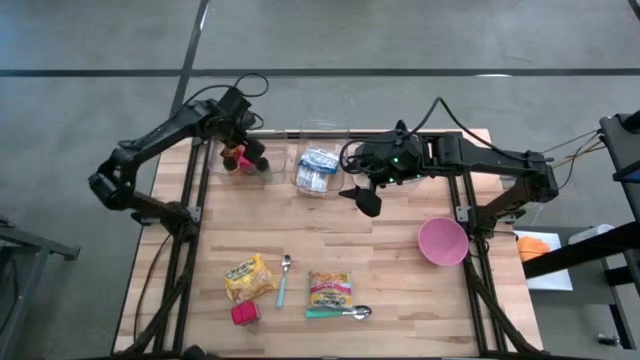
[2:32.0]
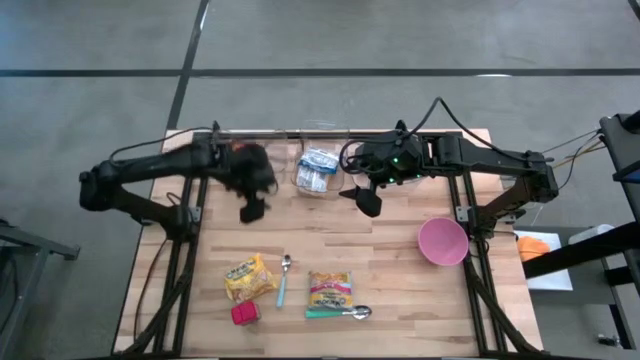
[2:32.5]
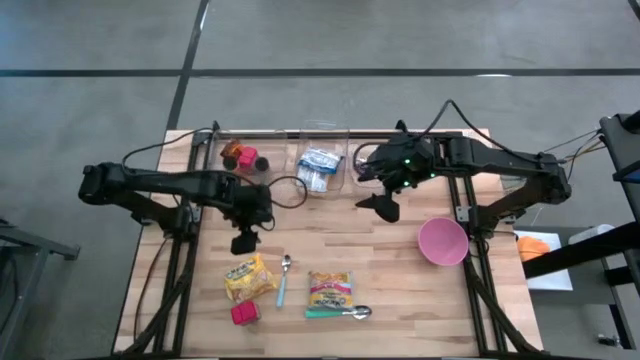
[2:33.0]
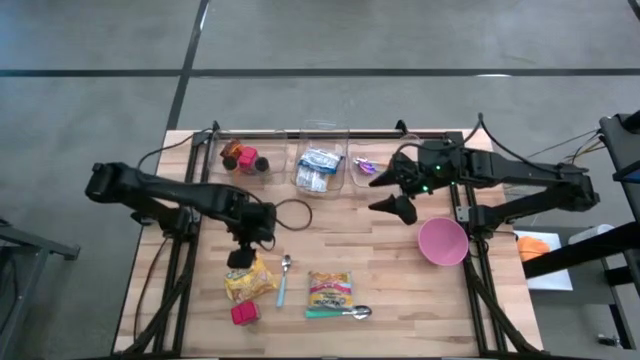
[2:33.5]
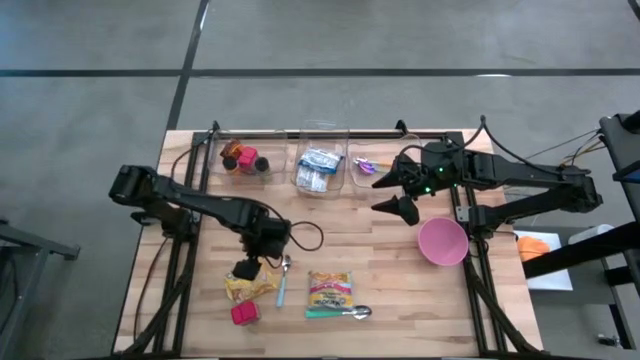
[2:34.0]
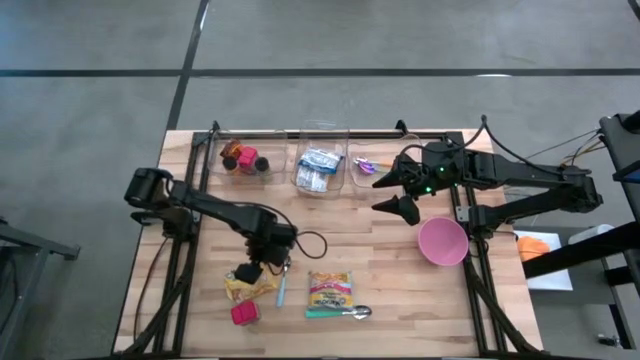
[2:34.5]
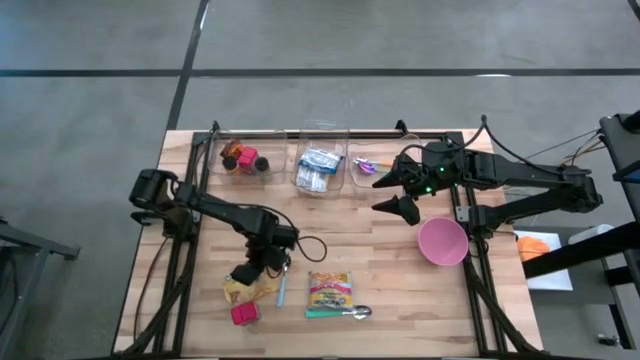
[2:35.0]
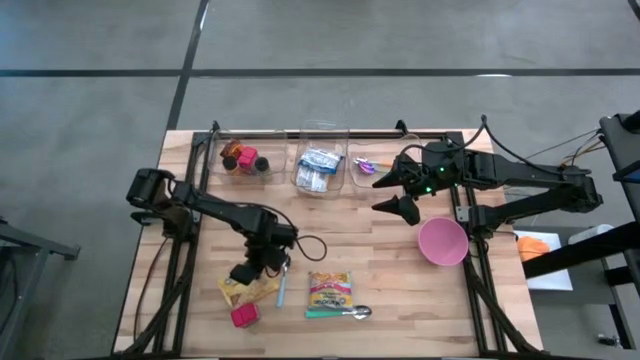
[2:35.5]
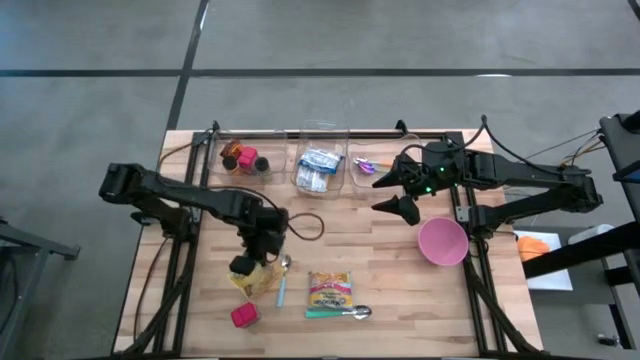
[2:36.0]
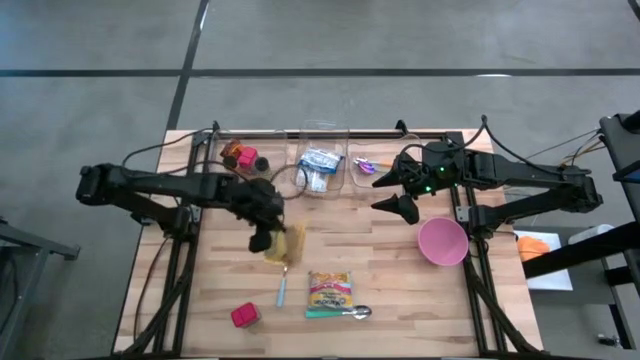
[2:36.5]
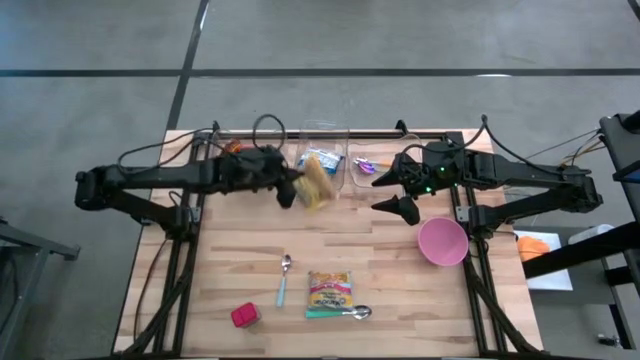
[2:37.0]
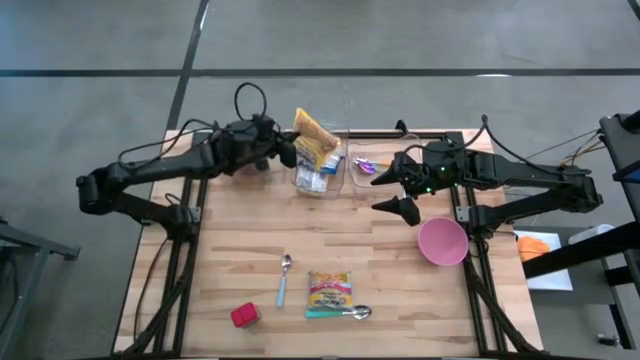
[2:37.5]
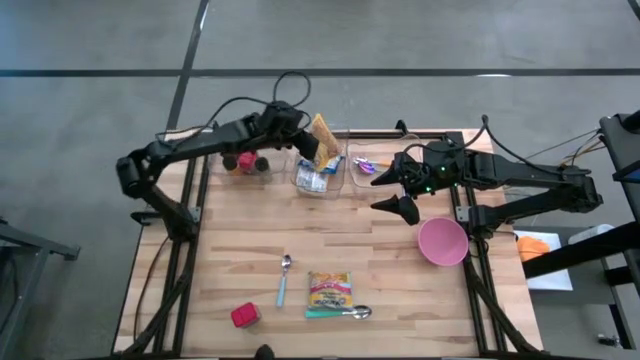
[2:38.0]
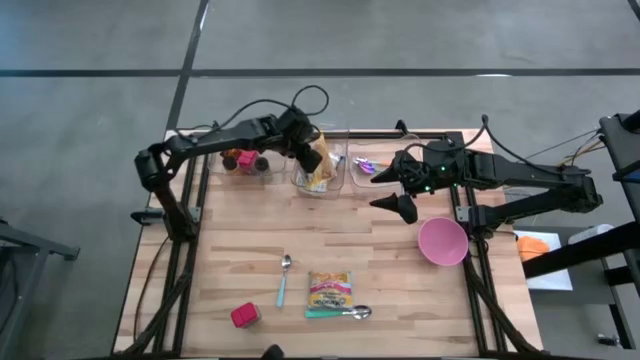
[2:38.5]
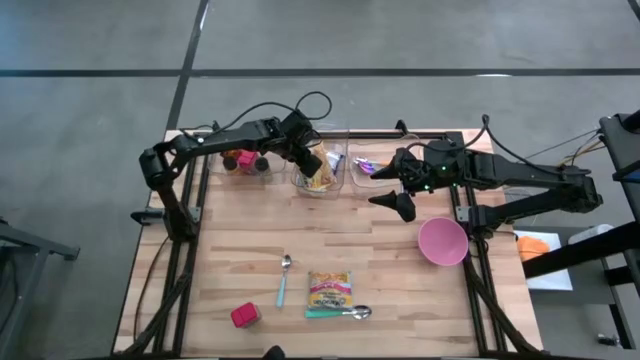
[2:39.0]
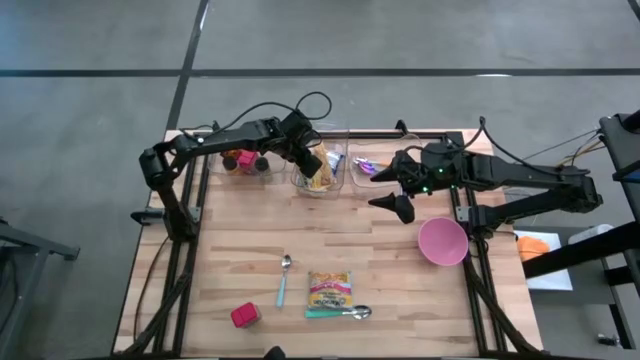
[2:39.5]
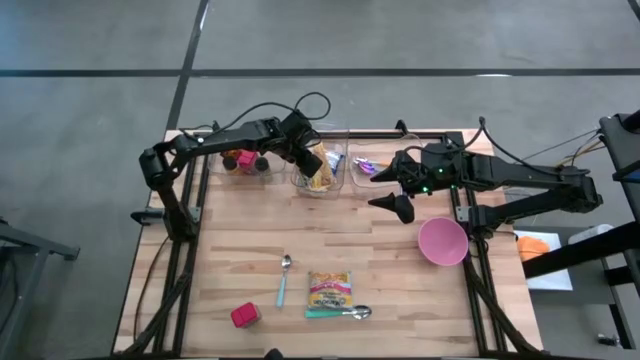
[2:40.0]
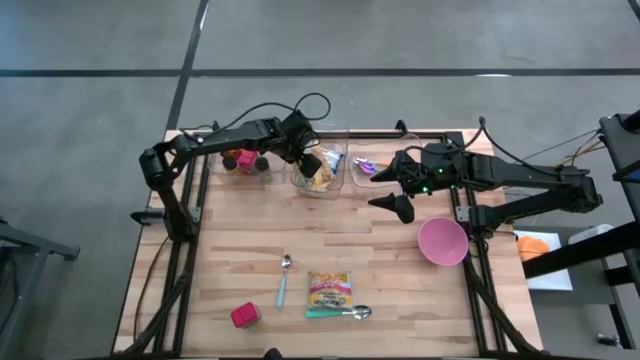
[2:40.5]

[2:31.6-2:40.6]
Put the yellow noodle pack into the middle transparent bin

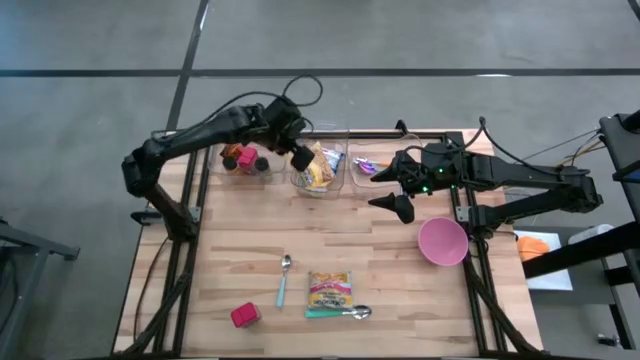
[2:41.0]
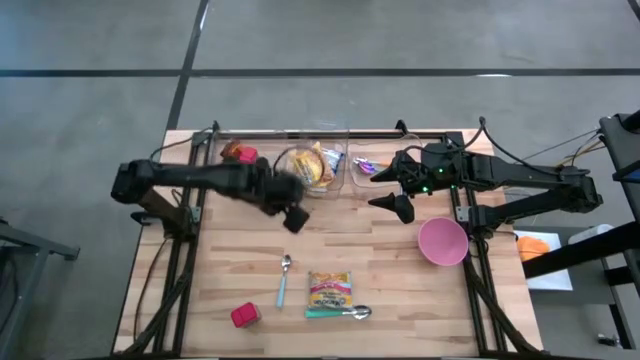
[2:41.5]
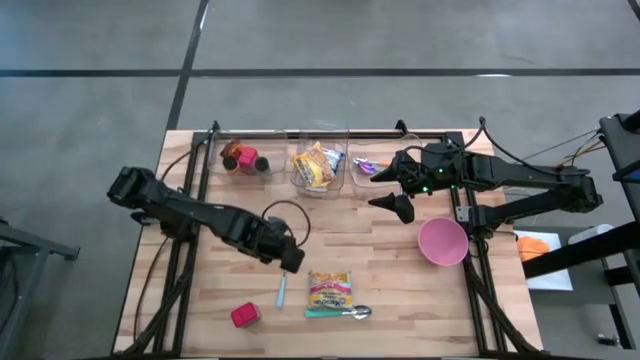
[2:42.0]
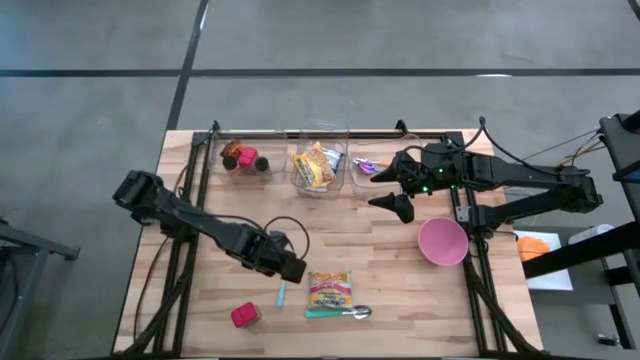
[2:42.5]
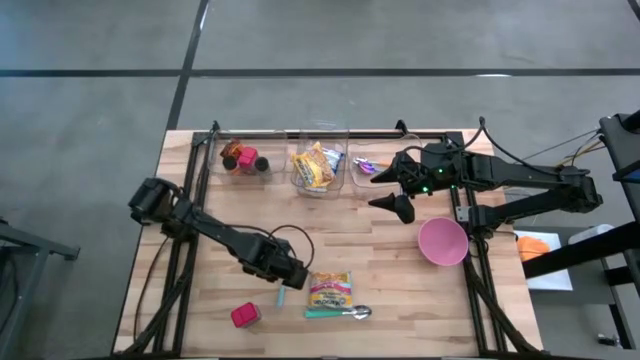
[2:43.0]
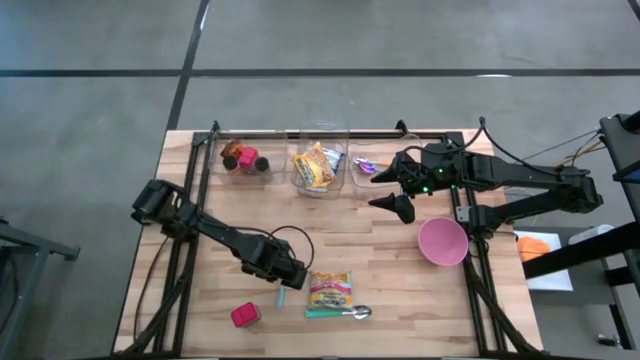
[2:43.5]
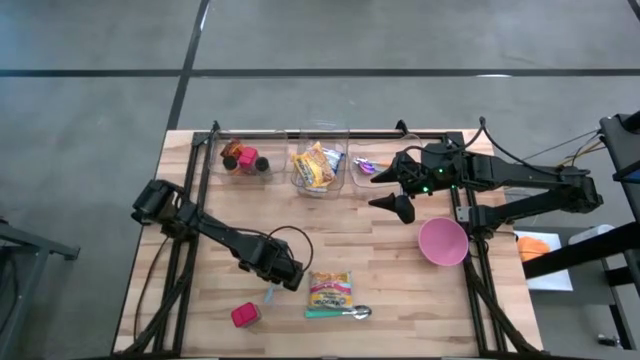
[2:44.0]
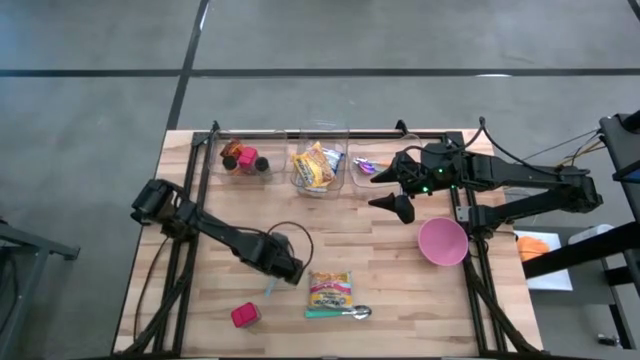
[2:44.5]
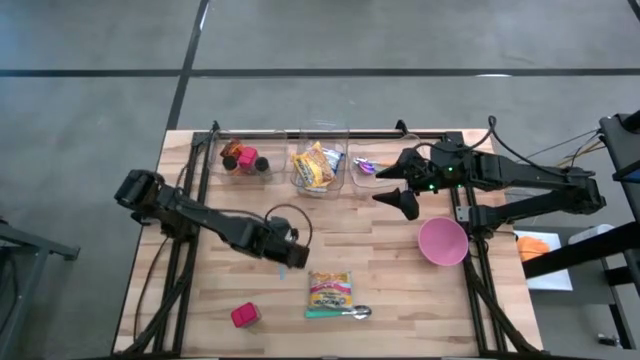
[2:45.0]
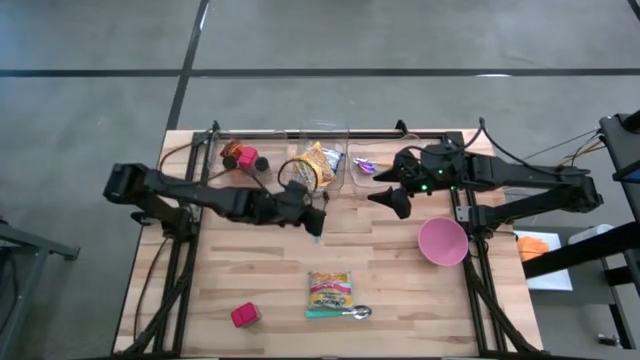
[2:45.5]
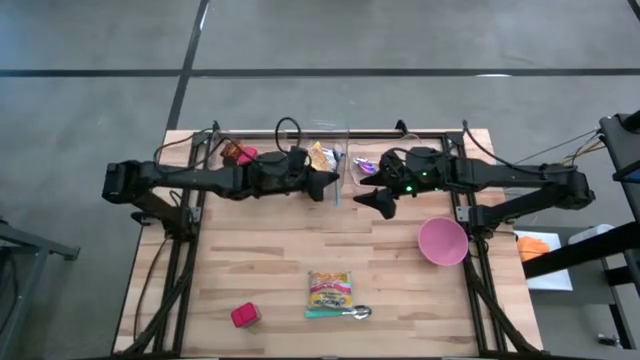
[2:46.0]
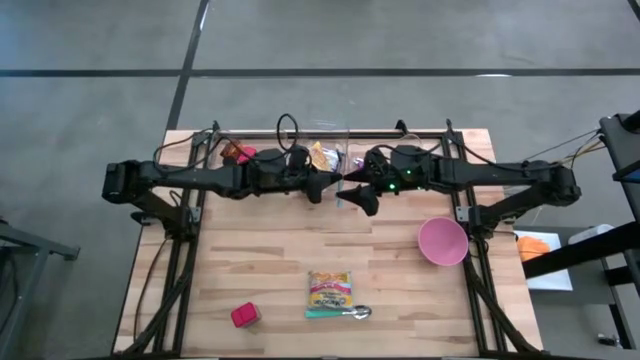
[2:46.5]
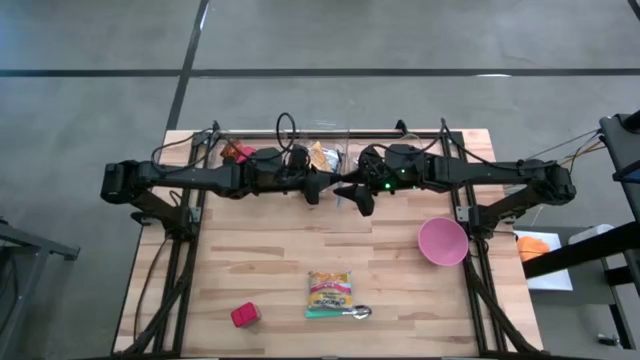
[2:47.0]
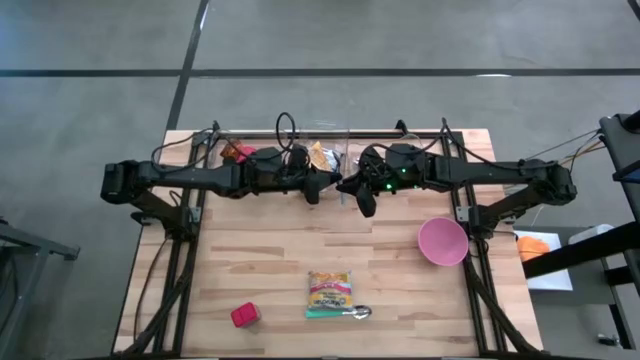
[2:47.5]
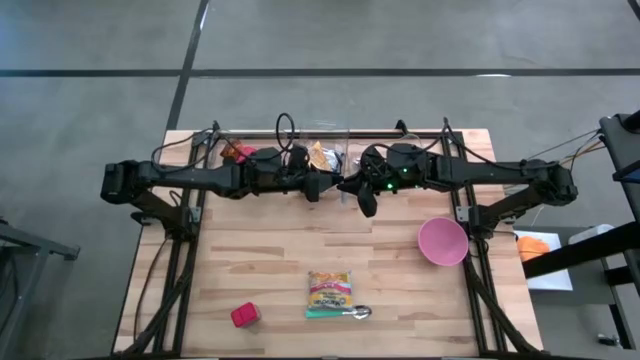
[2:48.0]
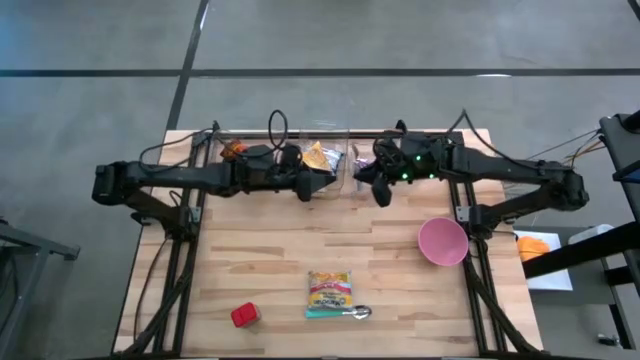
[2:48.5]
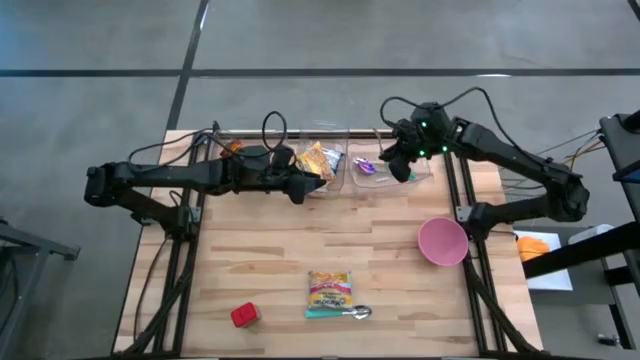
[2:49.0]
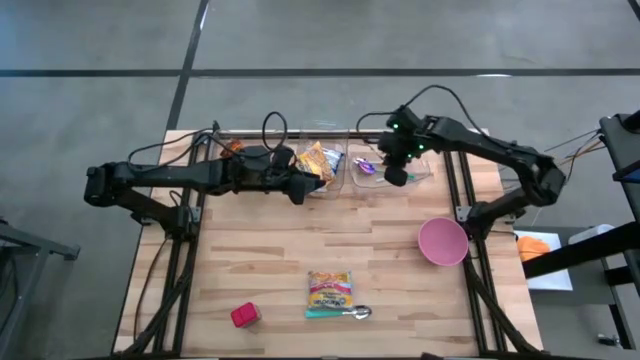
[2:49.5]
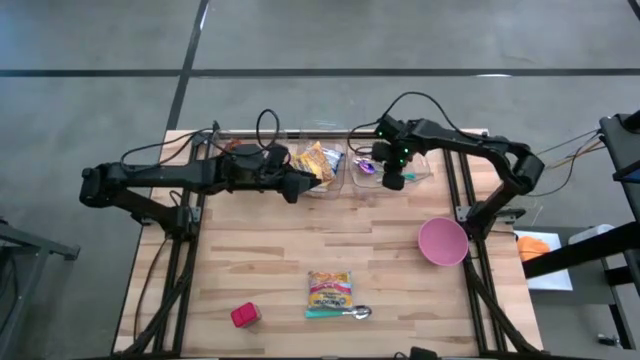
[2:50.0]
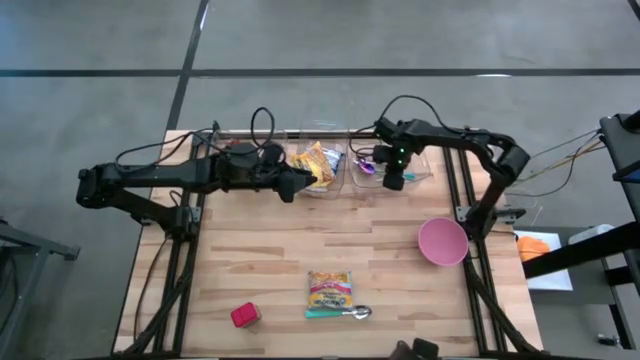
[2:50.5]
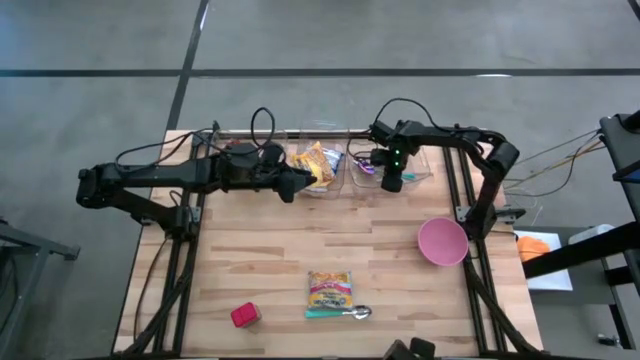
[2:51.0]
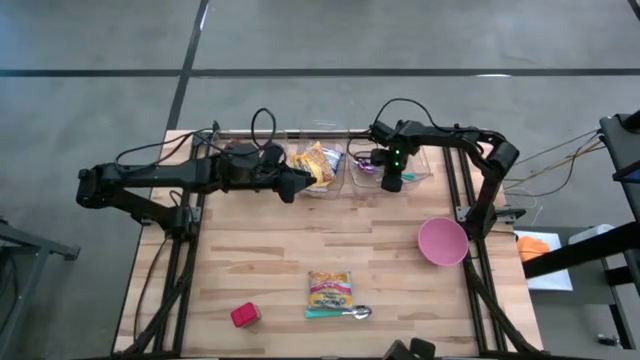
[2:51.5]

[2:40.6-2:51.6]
Put the light blue spoon into the right transparent bin
